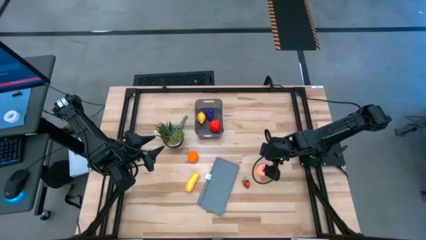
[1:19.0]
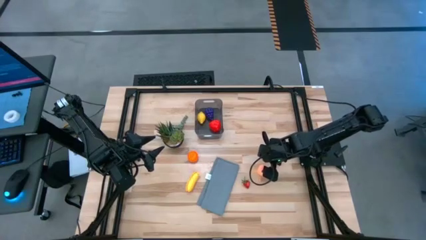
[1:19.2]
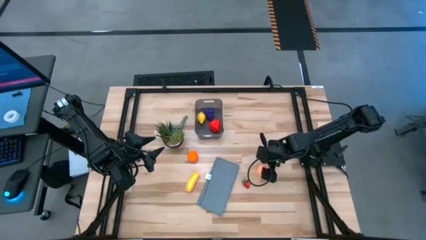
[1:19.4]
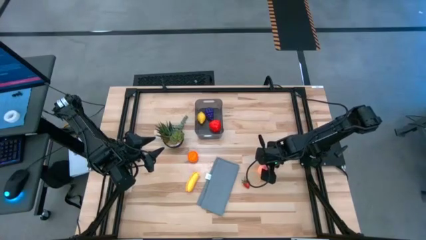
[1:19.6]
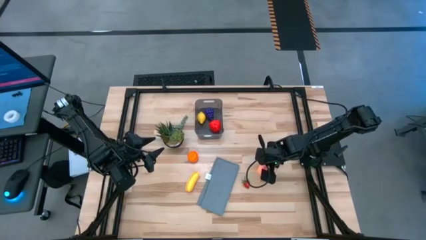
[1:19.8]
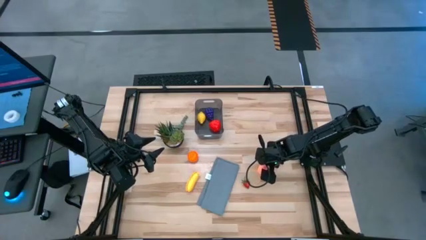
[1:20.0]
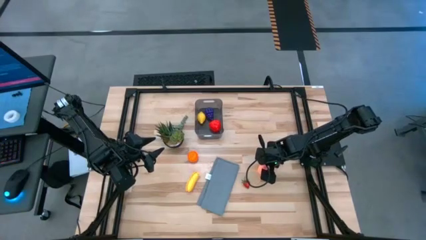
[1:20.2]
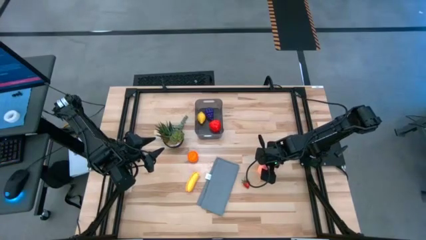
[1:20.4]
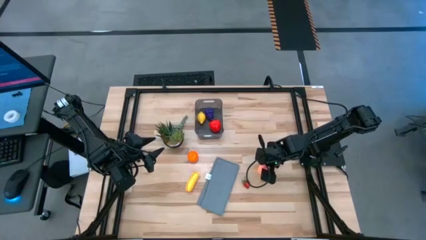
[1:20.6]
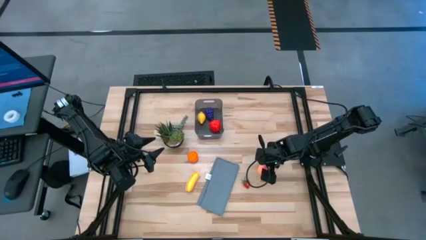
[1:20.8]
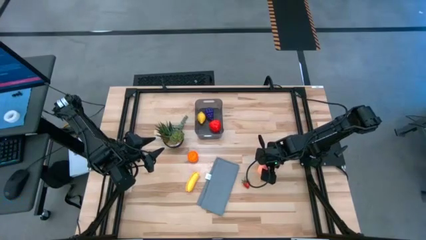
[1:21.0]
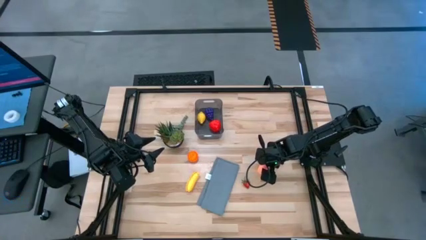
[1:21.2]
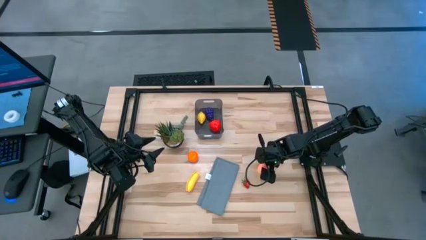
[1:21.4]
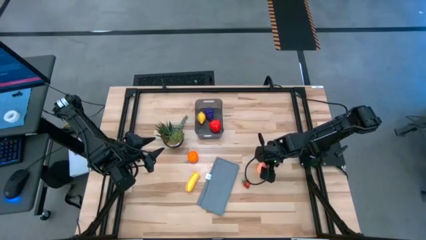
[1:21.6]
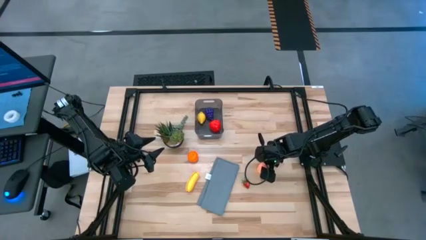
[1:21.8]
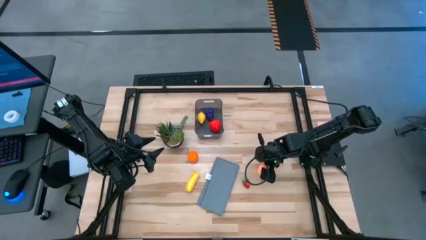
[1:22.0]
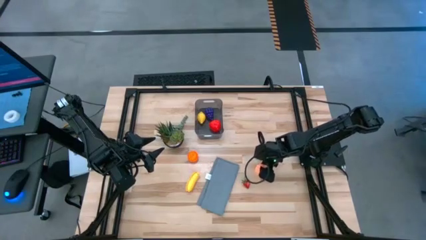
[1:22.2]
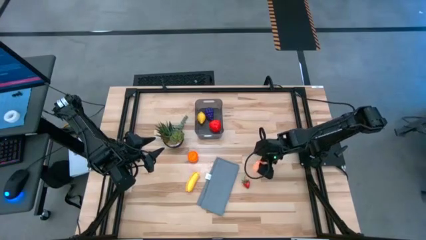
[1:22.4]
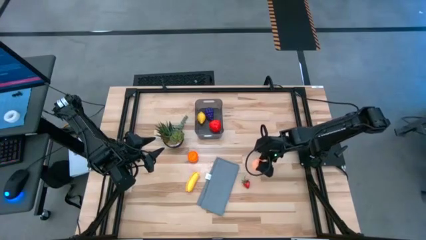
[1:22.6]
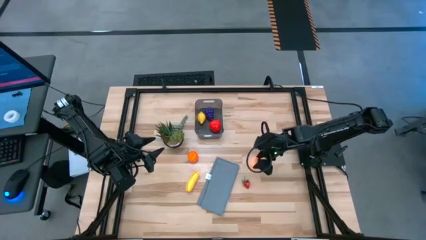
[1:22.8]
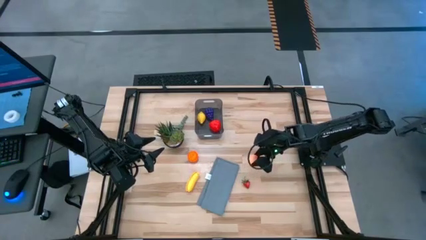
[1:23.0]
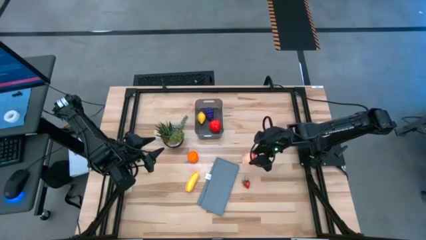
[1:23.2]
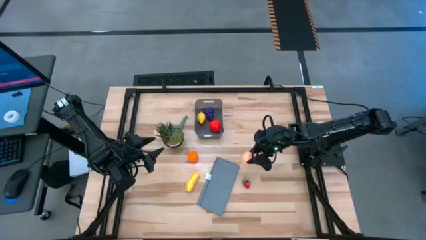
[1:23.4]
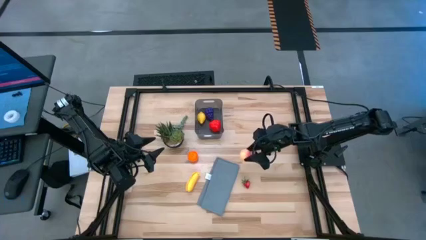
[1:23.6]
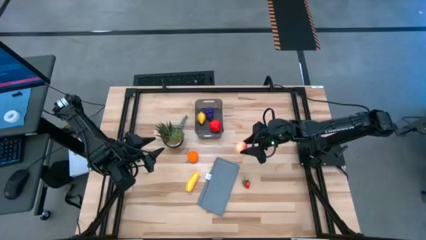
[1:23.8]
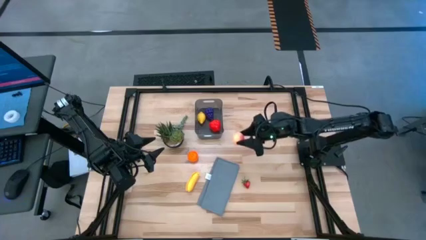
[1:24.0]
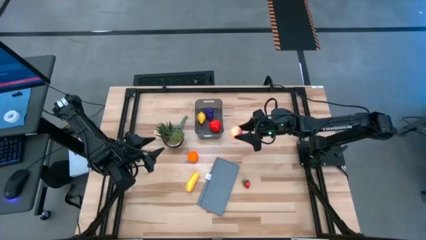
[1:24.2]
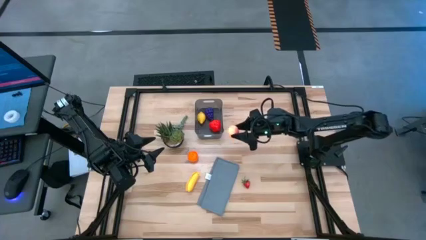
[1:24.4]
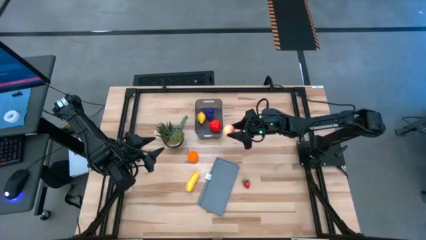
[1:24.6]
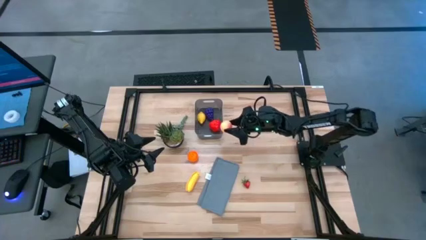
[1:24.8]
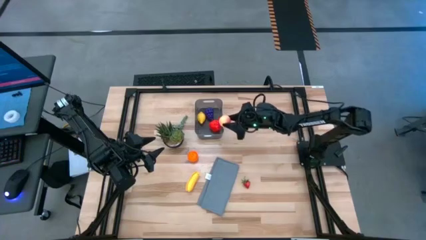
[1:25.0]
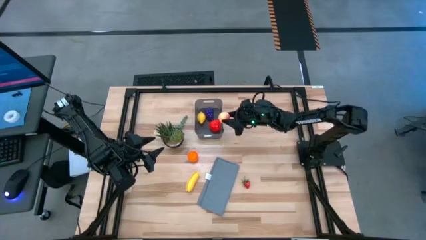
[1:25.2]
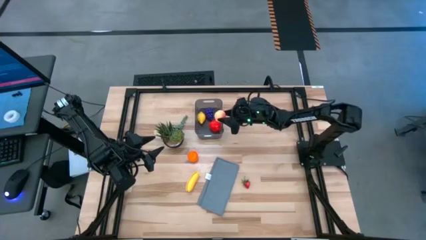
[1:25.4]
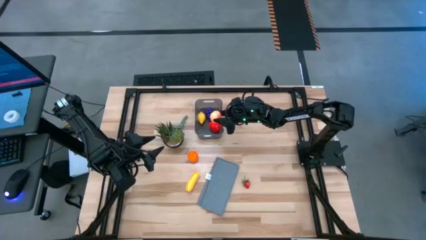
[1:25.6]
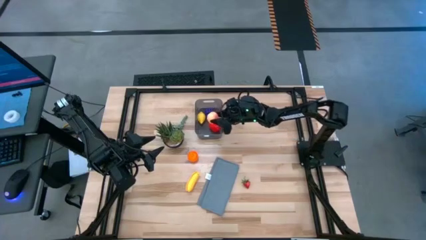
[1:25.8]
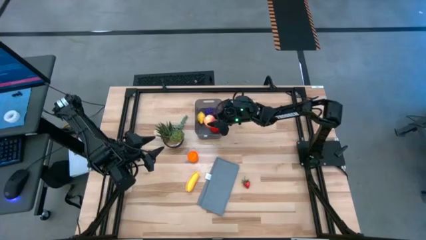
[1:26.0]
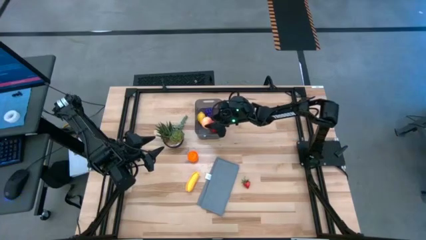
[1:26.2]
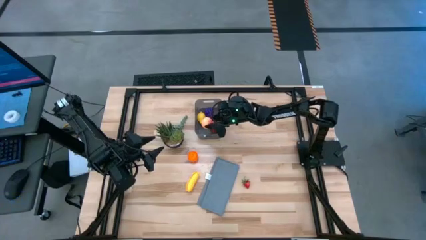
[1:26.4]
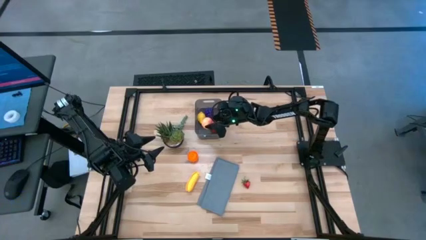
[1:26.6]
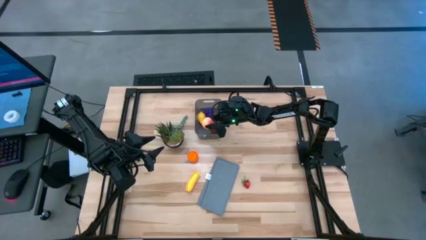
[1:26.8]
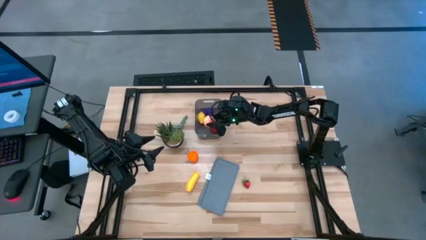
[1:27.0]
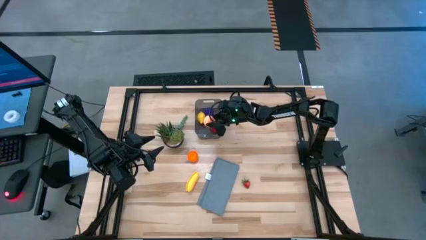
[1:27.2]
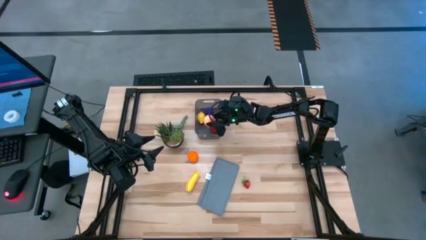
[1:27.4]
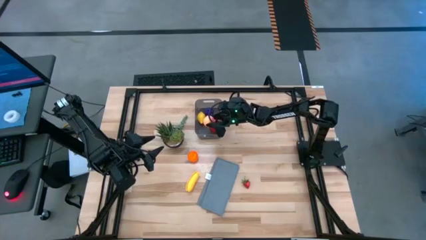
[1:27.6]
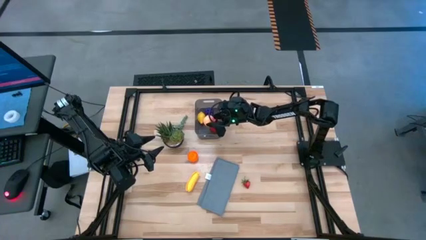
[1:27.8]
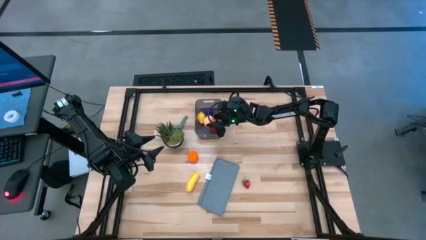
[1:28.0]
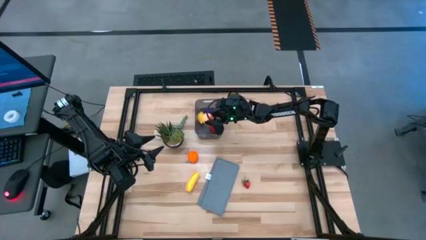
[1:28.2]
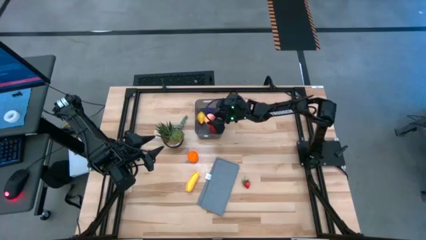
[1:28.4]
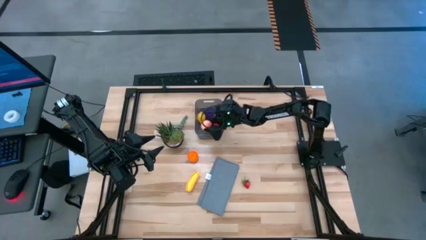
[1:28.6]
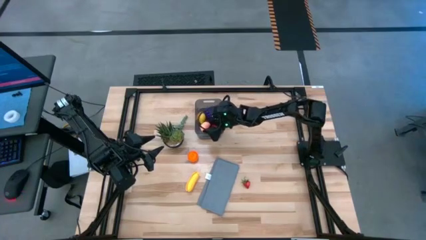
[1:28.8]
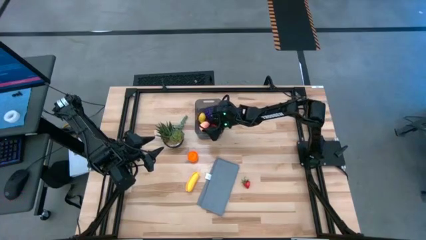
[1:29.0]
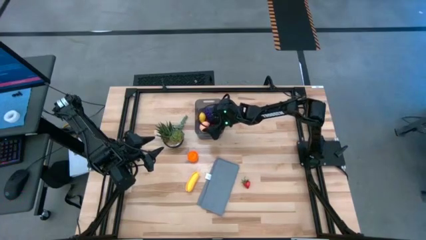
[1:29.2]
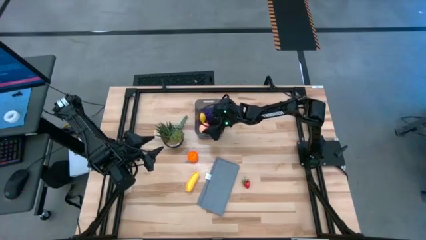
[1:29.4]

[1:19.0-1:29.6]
Task: Pick and placing Produce into tupperware
Put the pink peach into the black bin
